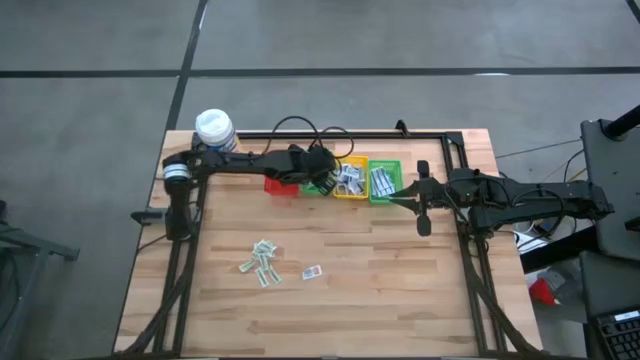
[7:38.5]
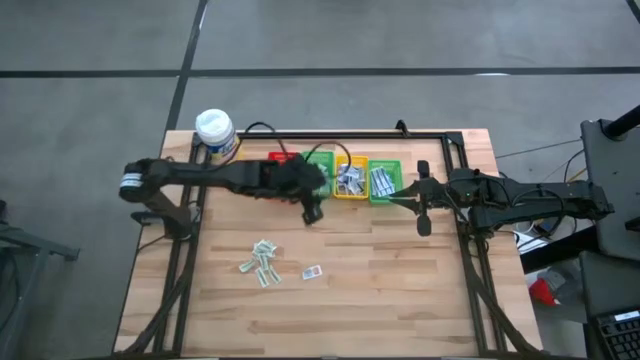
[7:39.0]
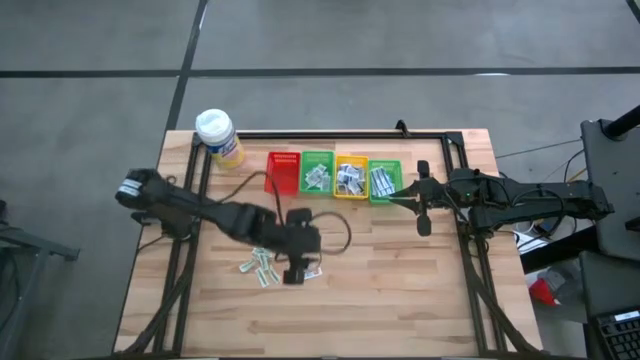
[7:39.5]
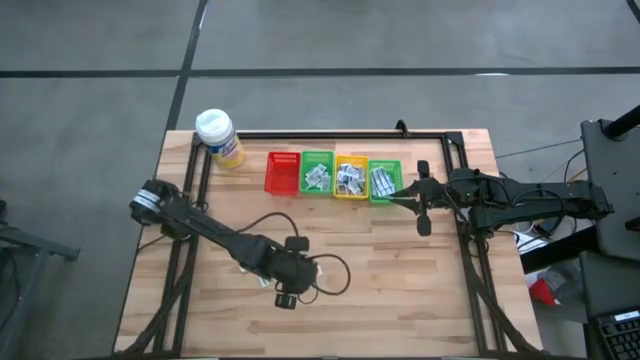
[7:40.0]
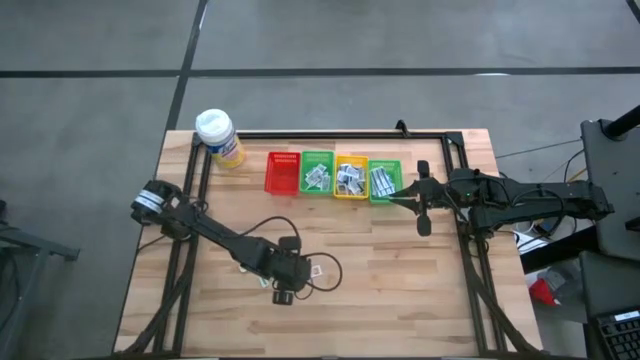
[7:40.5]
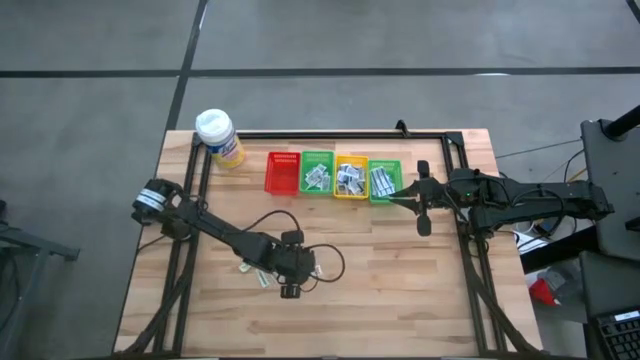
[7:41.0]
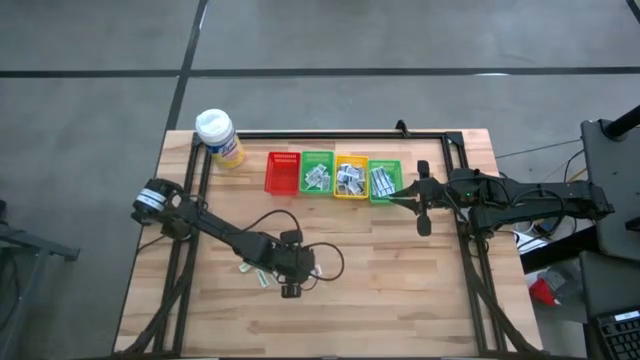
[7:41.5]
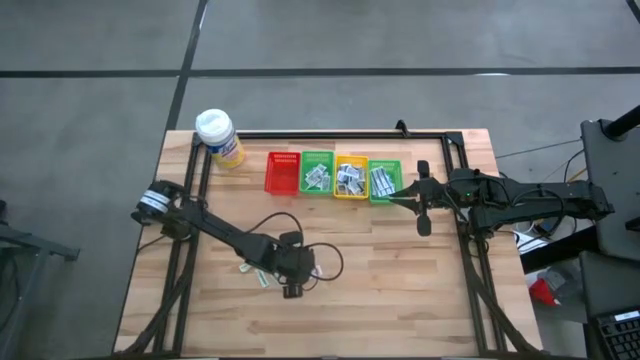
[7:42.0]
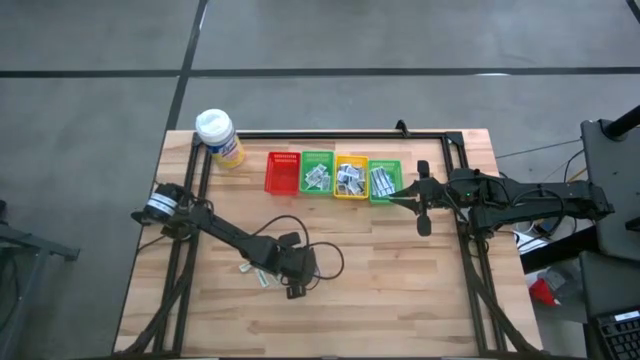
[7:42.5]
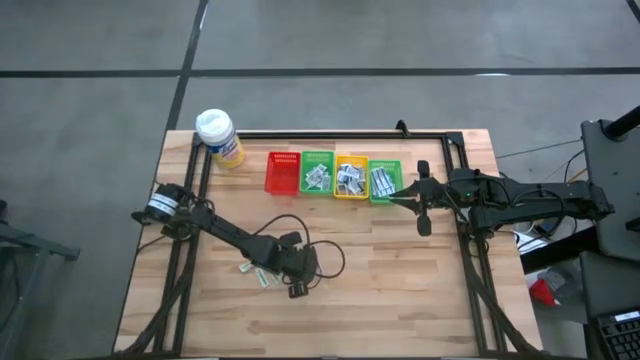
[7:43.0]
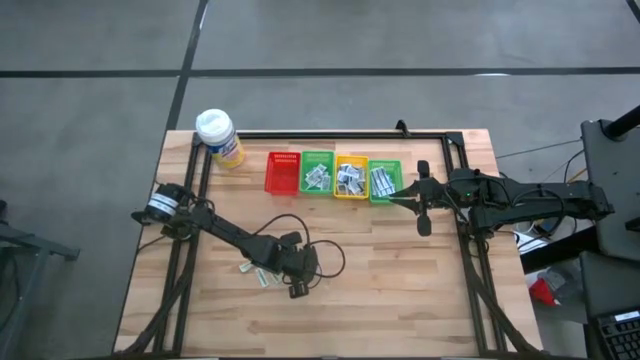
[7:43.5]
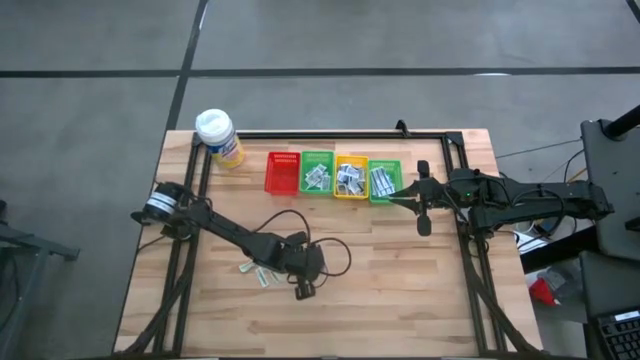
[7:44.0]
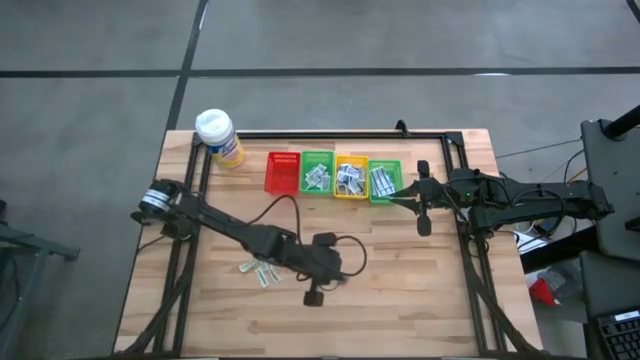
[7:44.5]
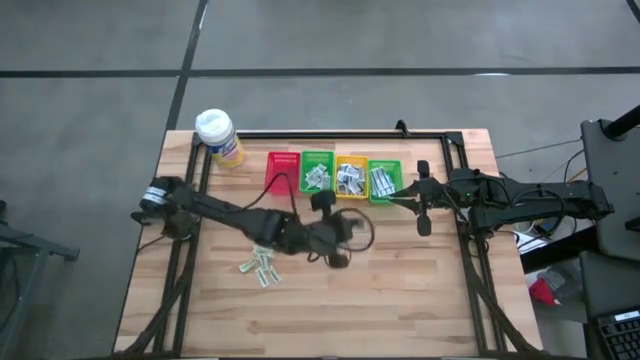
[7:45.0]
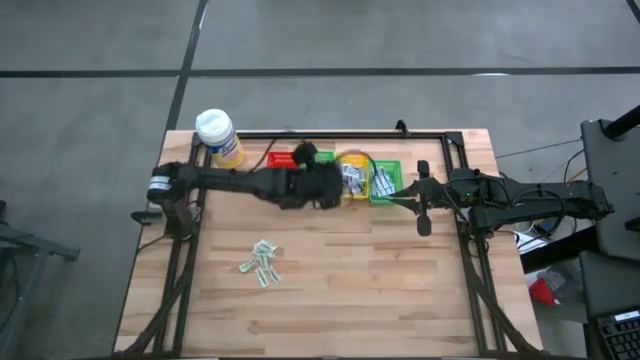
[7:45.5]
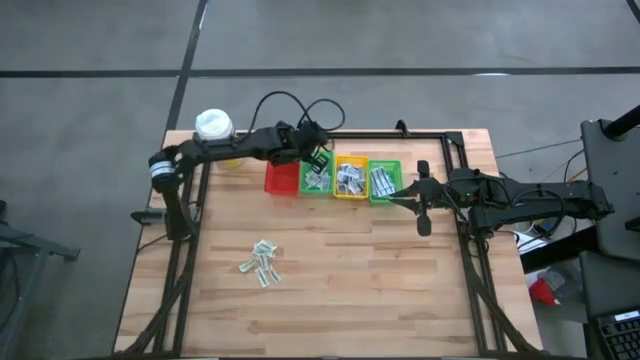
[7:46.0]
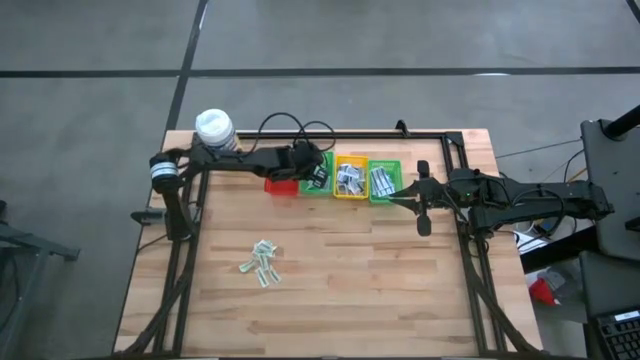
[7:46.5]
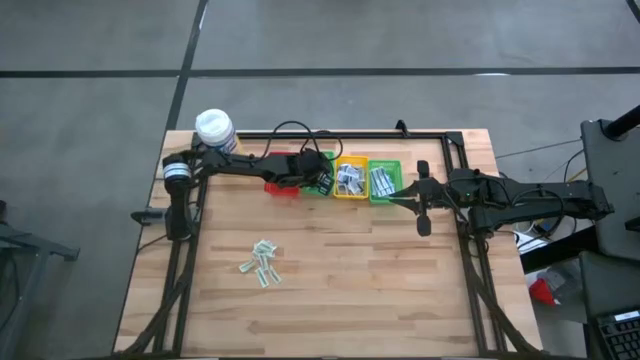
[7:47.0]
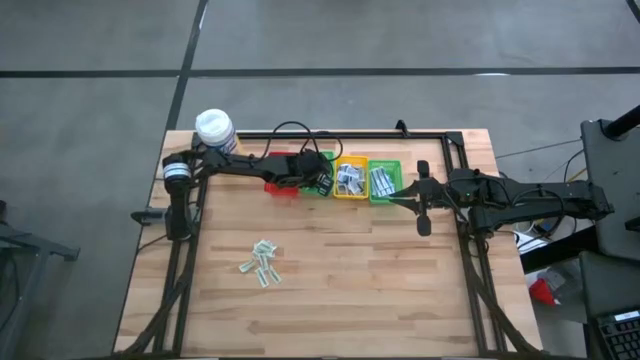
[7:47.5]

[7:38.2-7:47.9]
Task: Pick & Place First Aid Supplies
Put the orange ointment pack into the left green bin

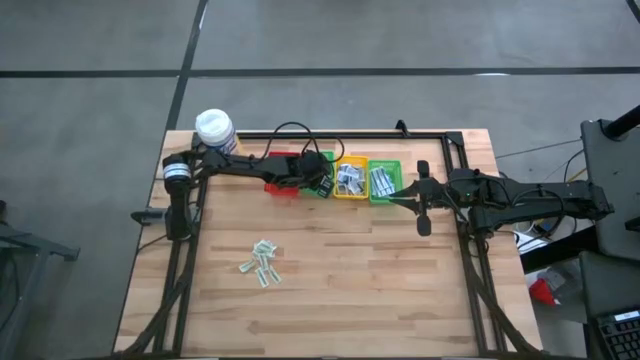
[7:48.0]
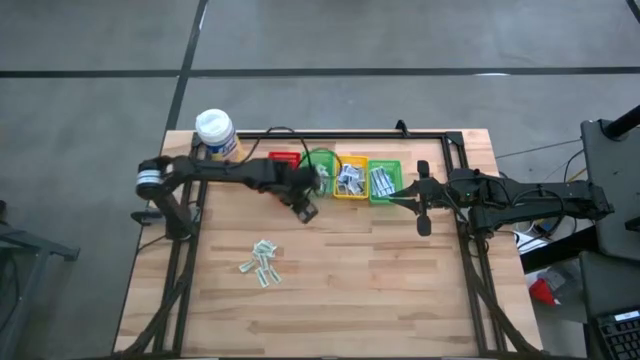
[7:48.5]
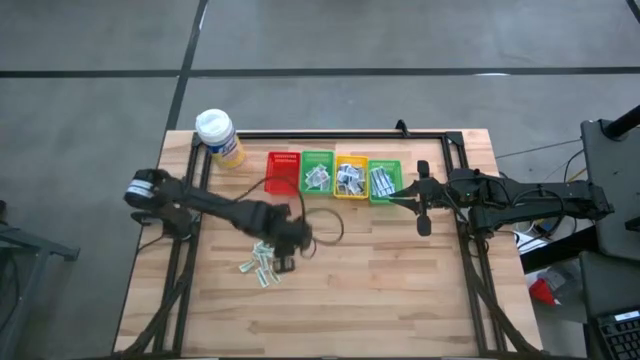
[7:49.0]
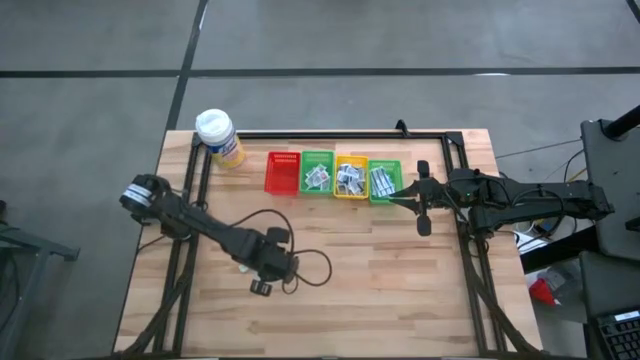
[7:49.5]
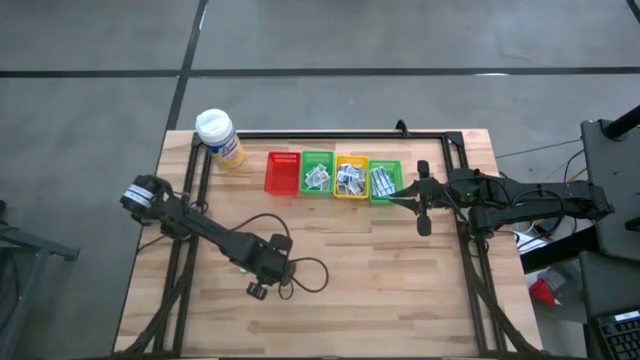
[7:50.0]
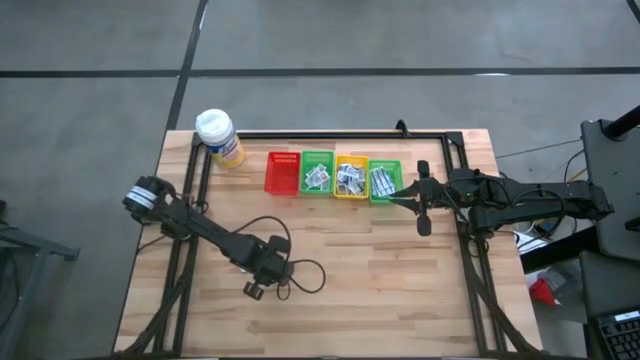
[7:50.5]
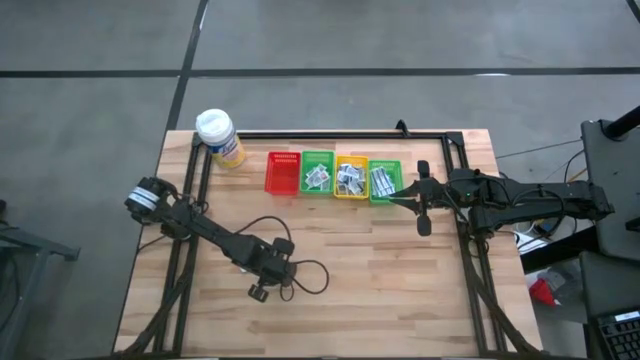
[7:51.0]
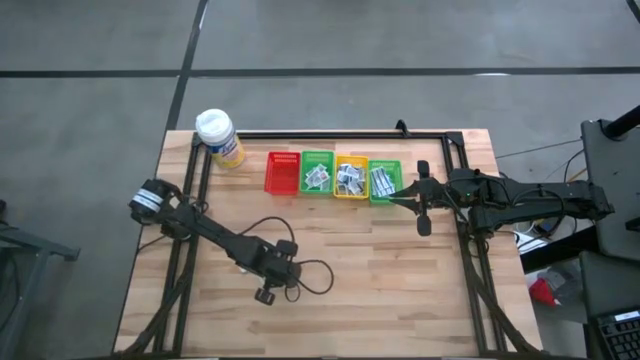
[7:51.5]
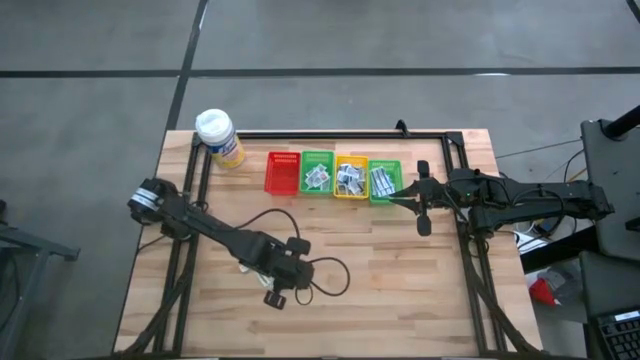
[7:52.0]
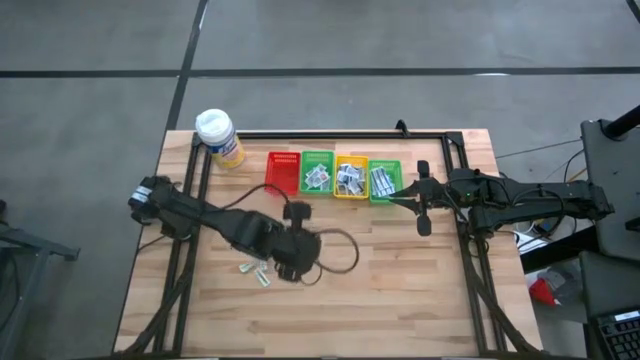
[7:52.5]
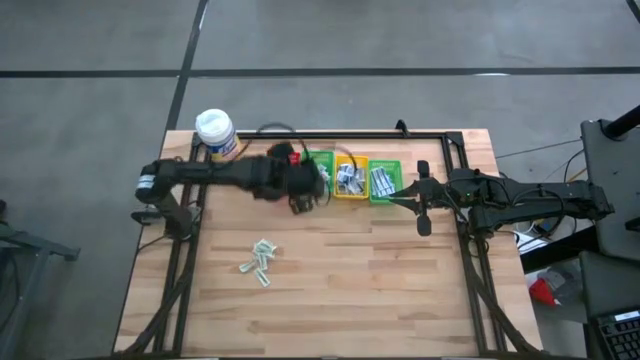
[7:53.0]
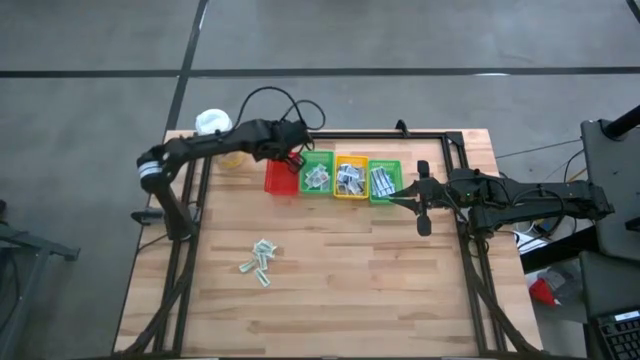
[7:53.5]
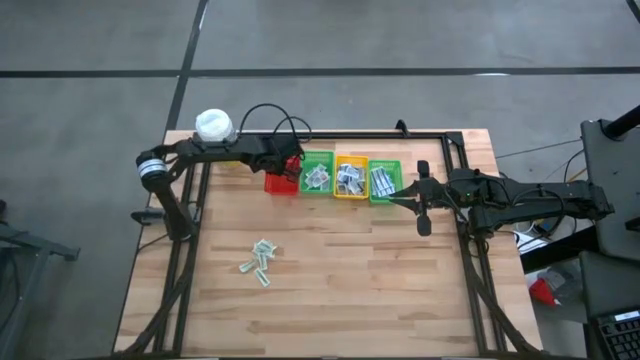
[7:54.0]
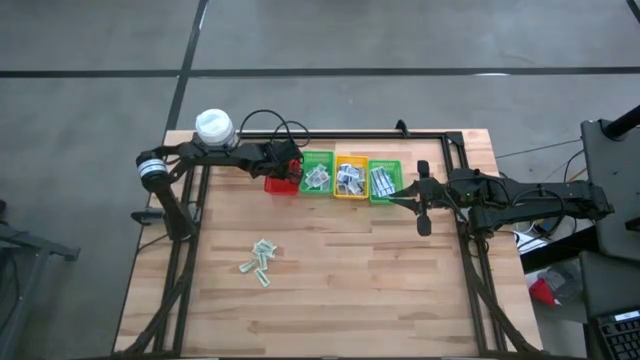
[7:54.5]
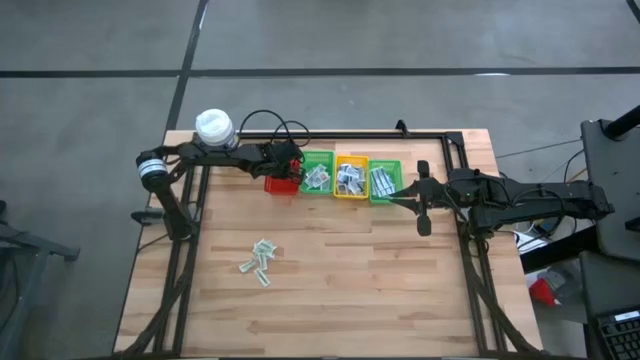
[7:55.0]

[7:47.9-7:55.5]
Put the green bandage into the red bin
